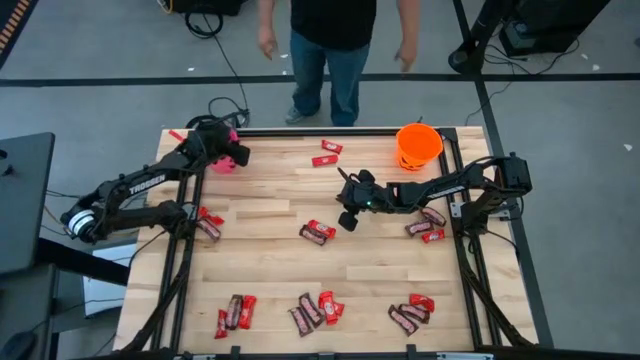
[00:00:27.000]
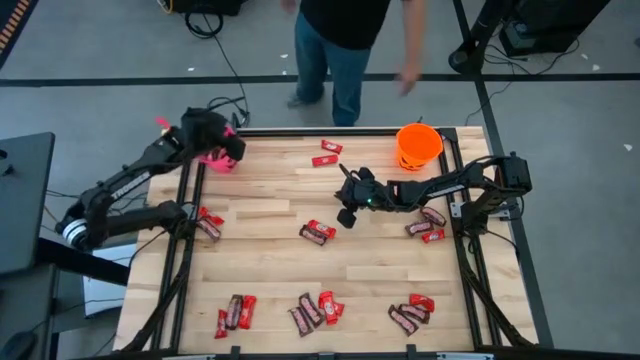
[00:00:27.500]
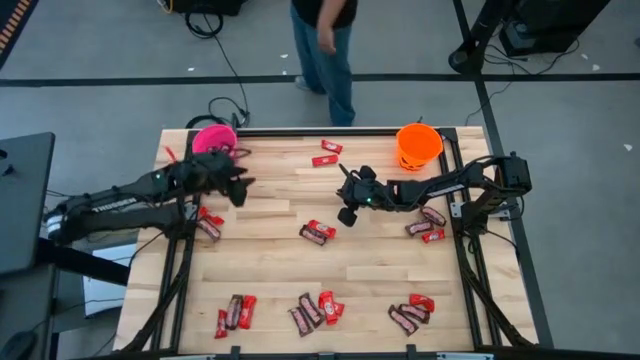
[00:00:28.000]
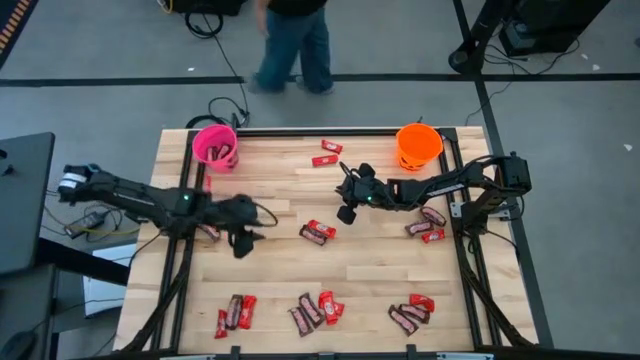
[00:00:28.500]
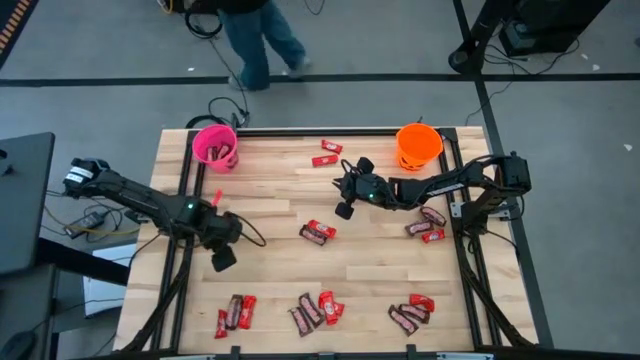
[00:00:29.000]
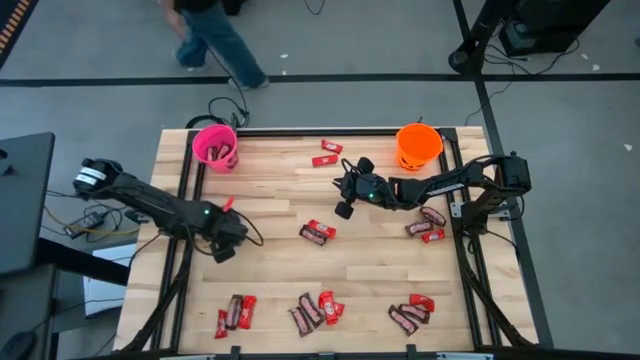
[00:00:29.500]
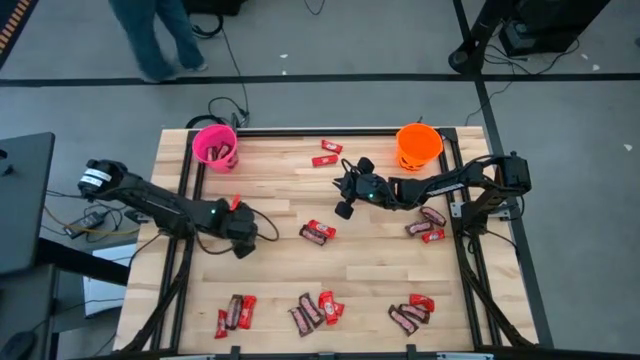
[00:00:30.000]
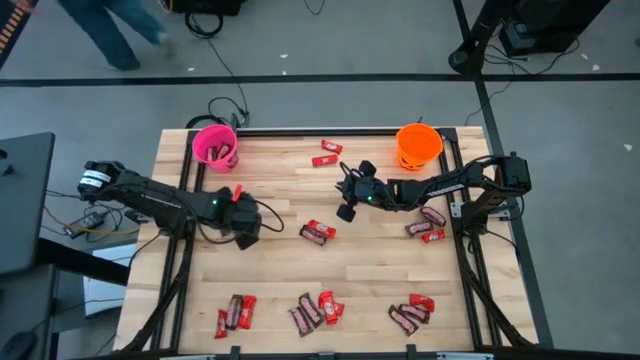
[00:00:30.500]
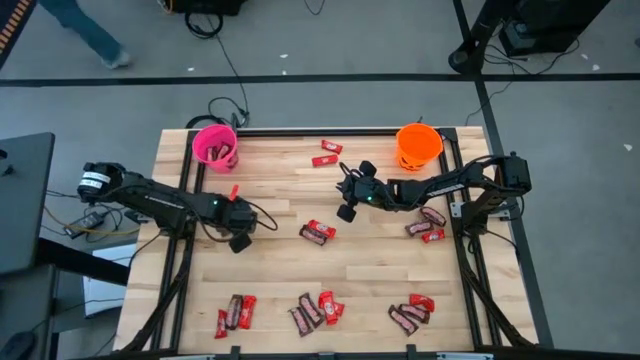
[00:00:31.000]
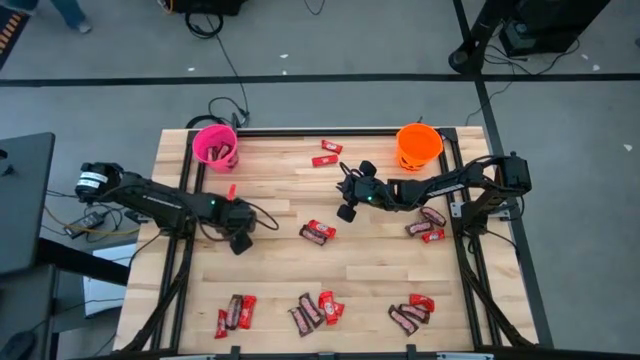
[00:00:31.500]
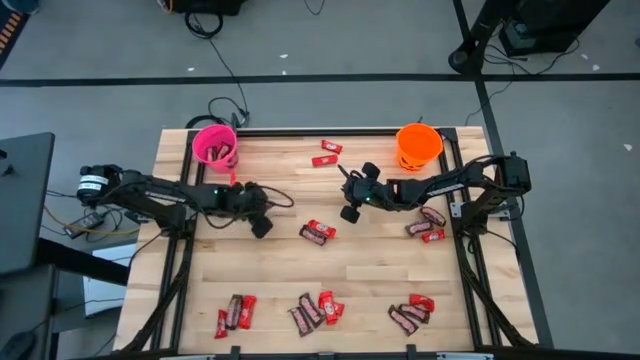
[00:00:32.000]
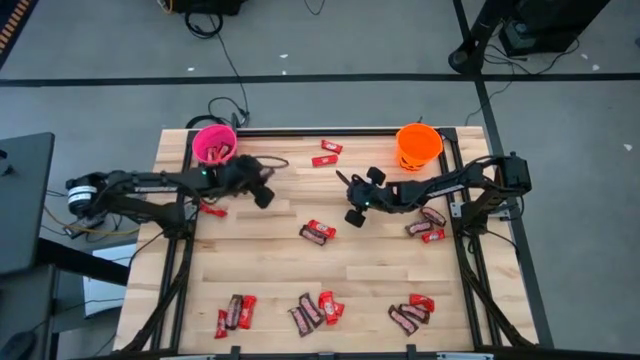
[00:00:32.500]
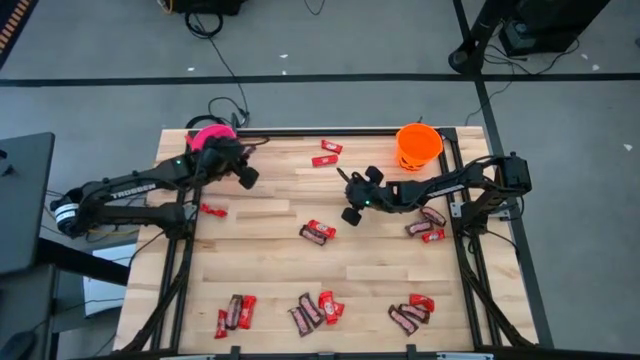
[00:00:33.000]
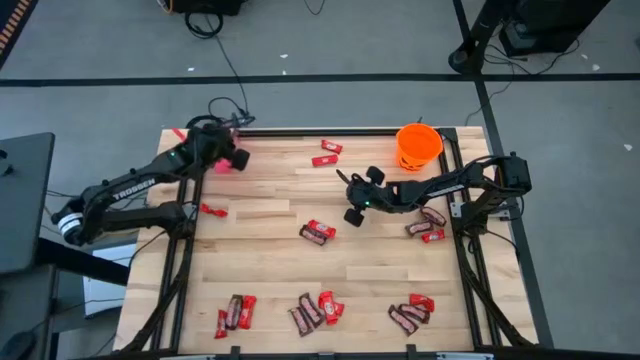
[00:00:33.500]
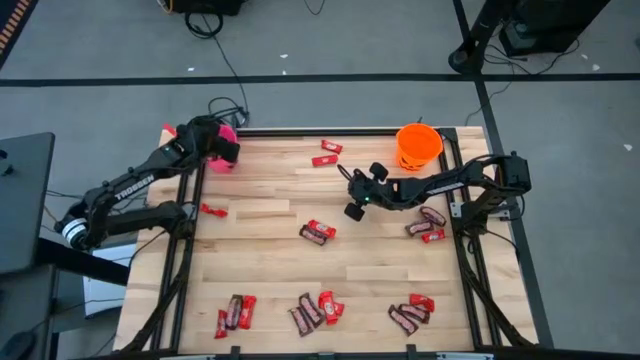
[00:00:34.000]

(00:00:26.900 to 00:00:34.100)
Task: Sort candy by brand, put in halloween buckets
Put the brown chocolate bar into the pink bucket

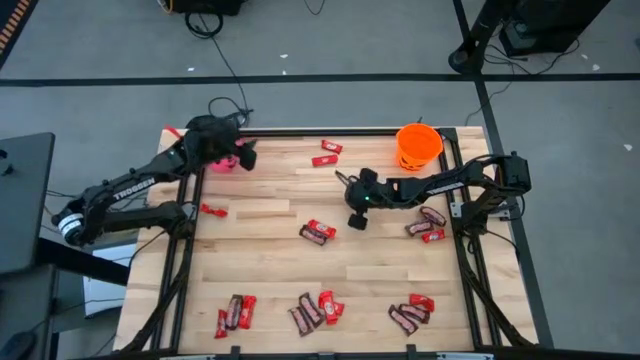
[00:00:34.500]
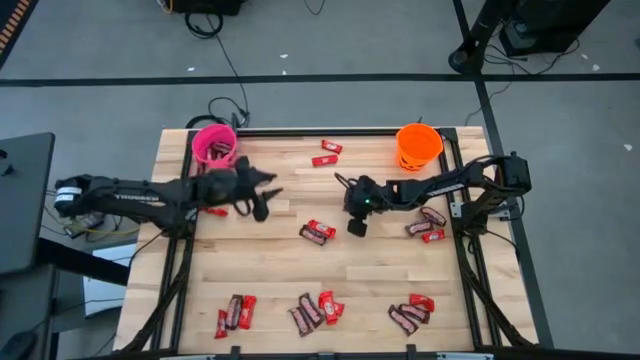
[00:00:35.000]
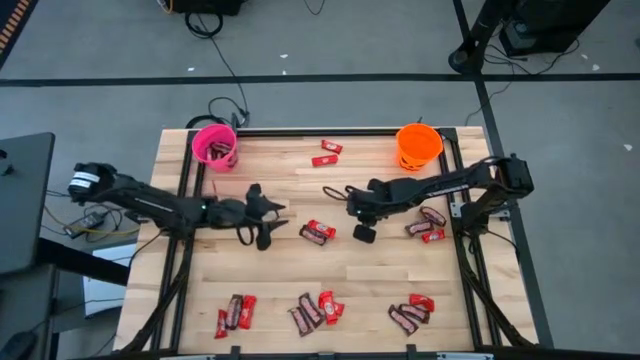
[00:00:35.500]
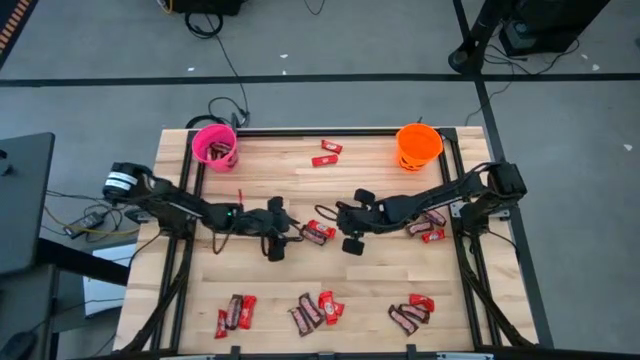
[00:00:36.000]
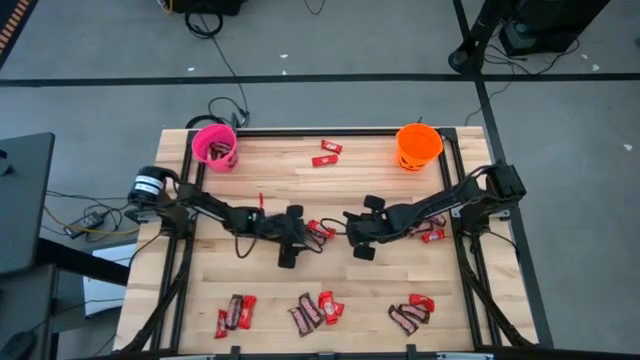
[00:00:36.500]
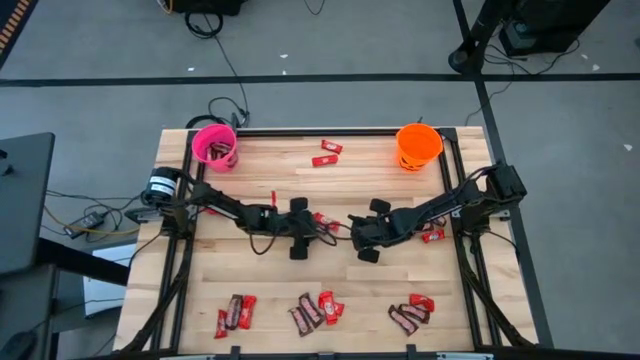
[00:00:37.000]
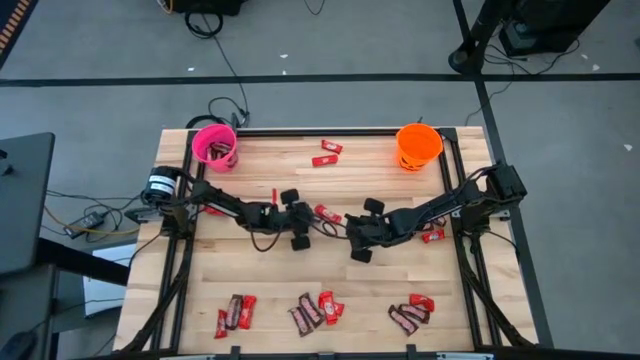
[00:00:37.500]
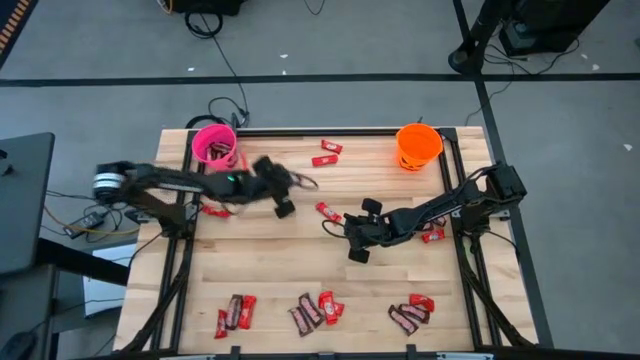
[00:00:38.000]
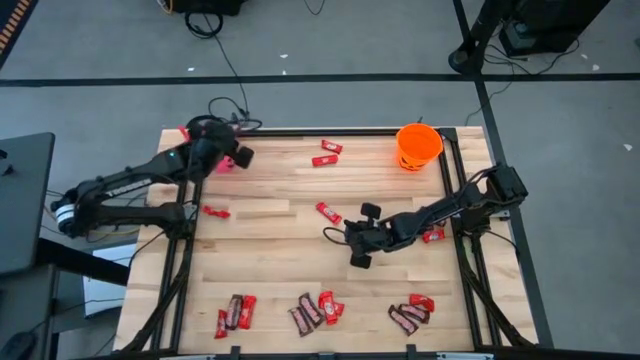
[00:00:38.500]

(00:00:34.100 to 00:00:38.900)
Put the brown chocolate bar into the pink bucket

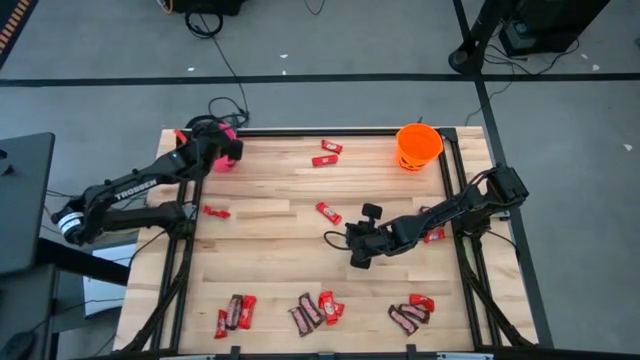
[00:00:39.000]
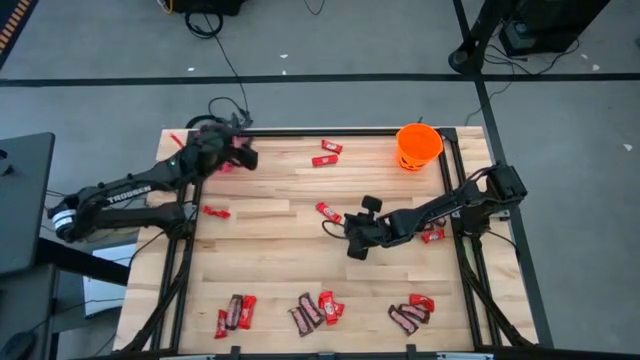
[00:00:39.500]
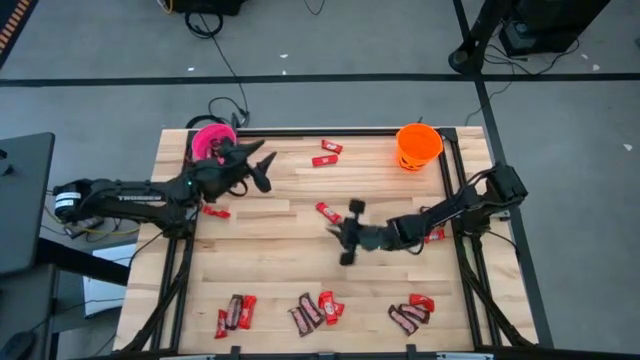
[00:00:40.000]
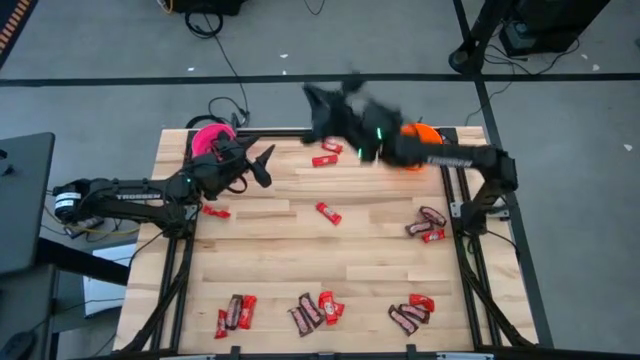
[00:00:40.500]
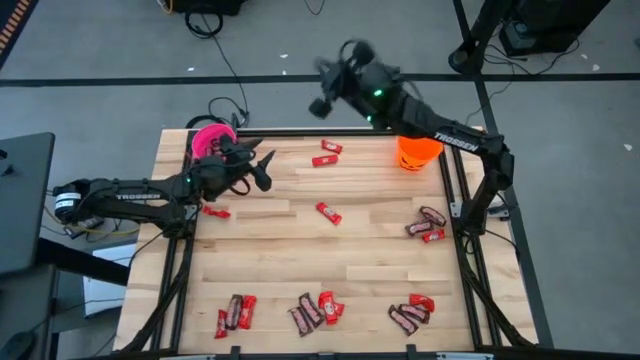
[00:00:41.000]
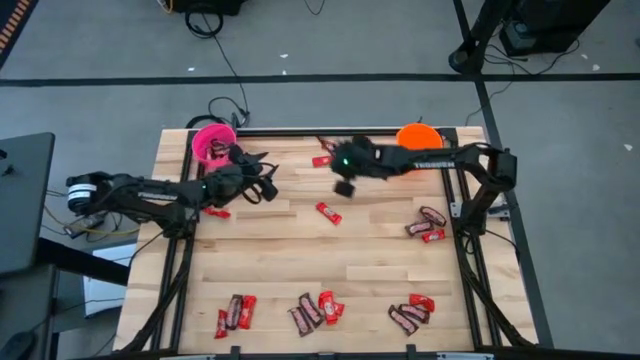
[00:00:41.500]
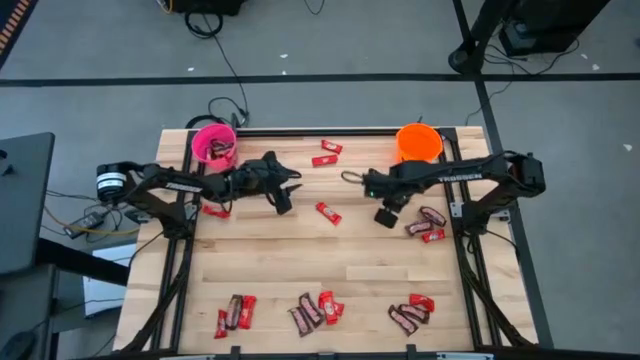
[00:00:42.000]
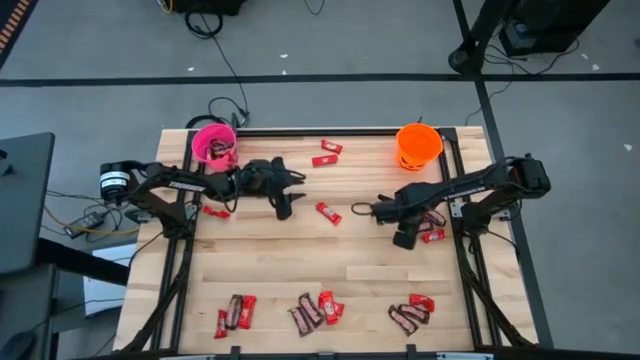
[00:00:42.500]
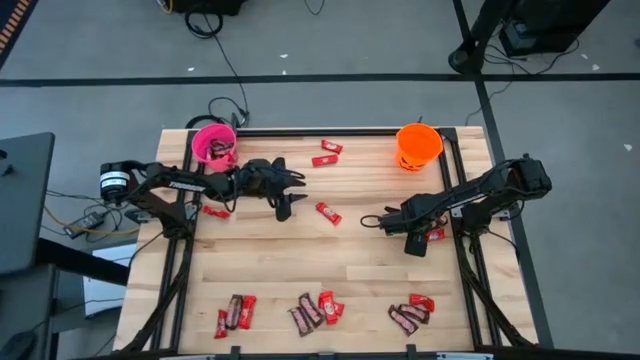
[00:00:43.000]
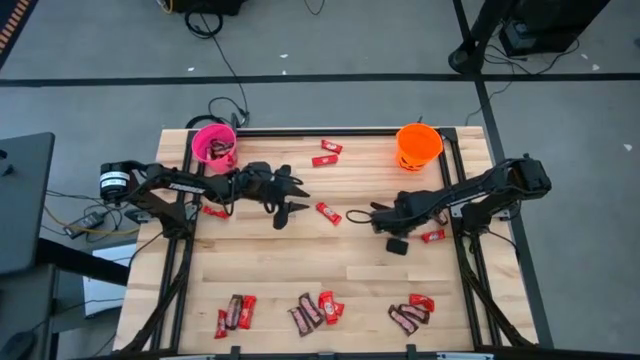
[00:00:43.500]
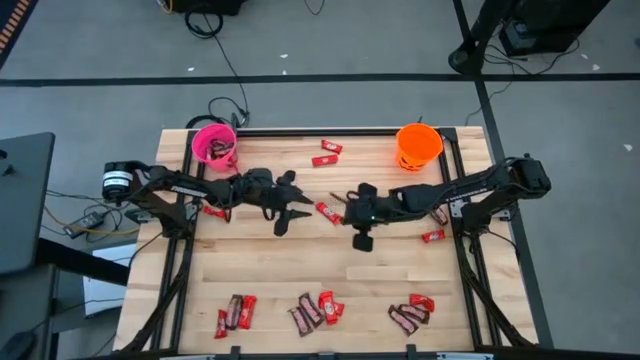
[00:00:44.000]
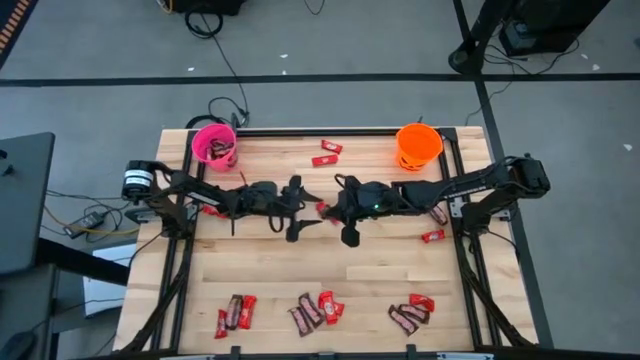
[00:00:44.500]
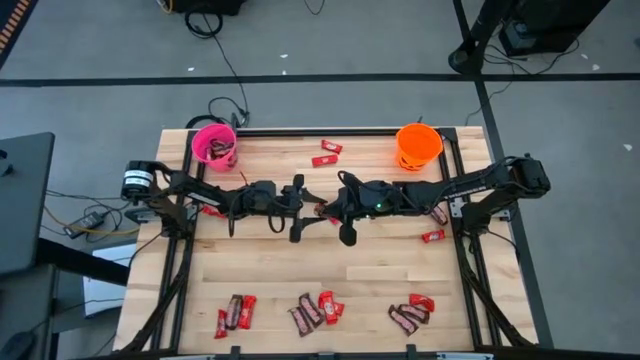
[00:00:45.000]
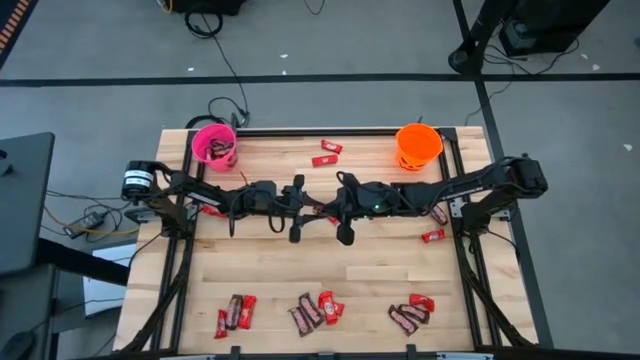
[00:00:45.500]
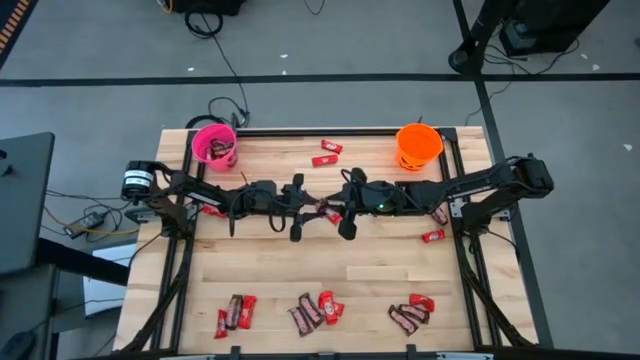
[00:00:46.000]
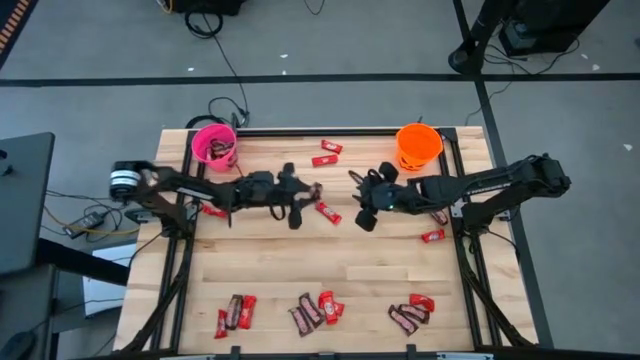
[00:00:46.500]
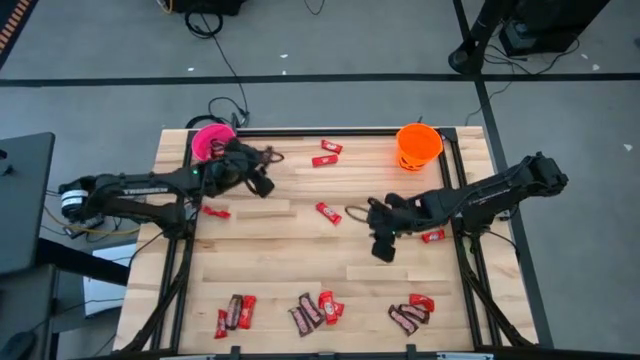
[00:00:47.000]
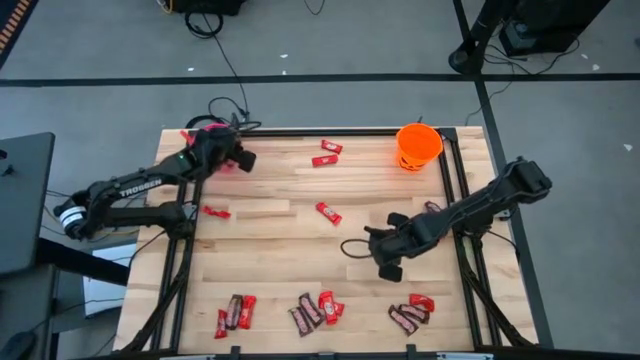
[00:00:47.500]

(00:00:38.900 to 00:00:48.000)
Put the brown chocolate bar into the pink bucket
